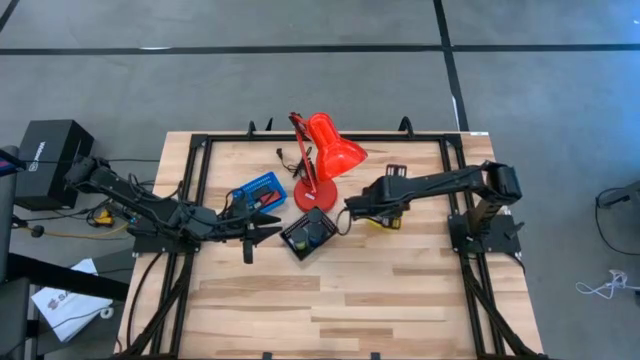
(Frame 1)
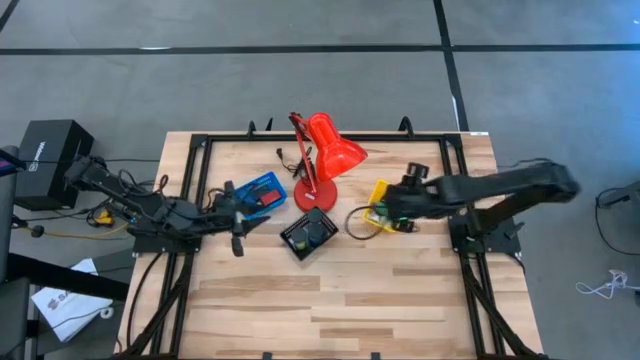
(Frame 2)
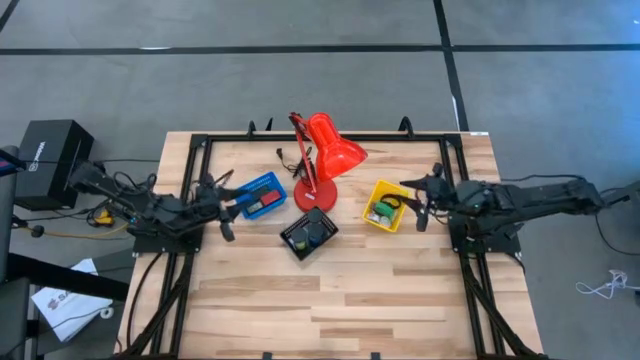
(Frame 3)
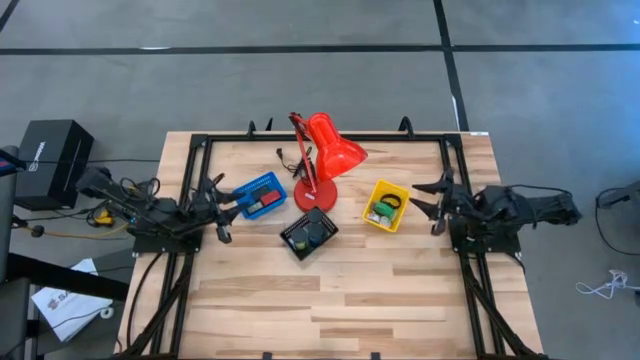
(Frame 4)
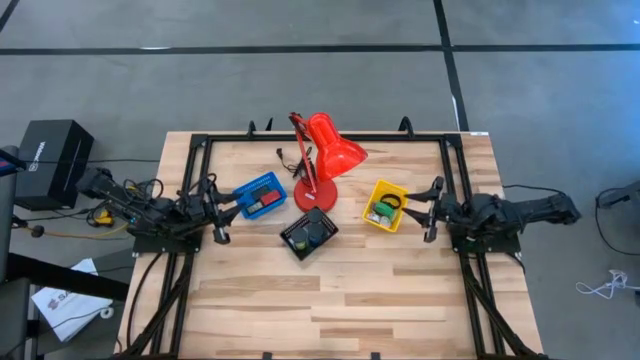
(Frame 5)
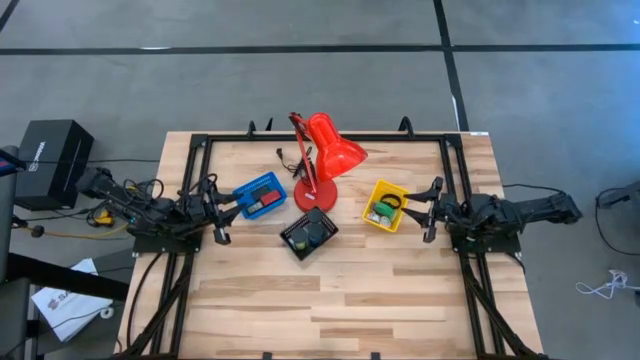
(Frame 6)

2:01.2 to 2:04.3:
Task: Pick & Place Office items
Return to home position

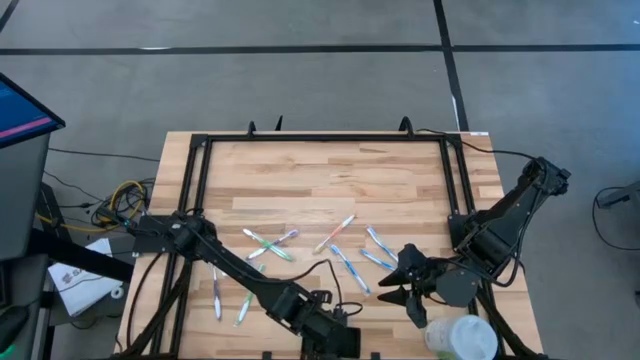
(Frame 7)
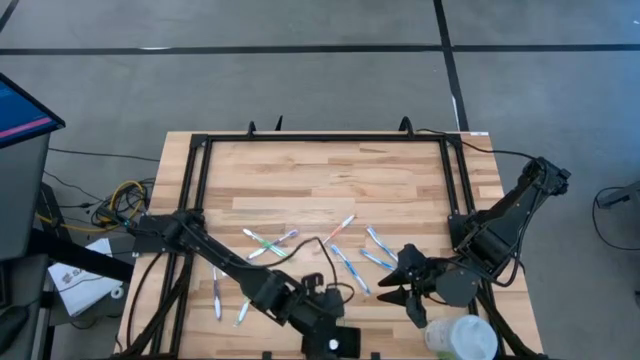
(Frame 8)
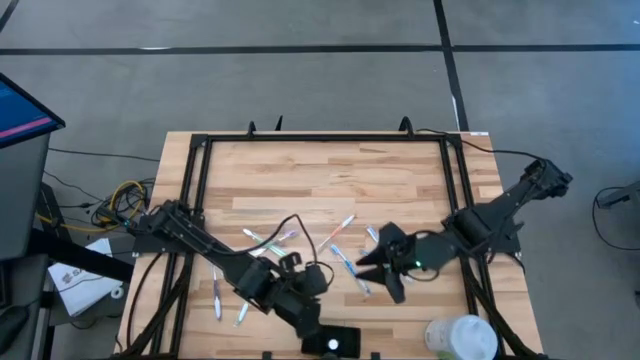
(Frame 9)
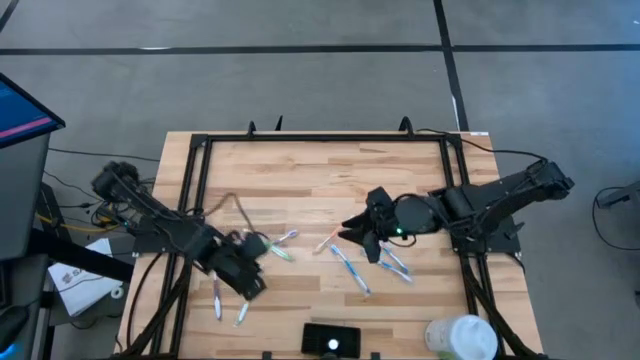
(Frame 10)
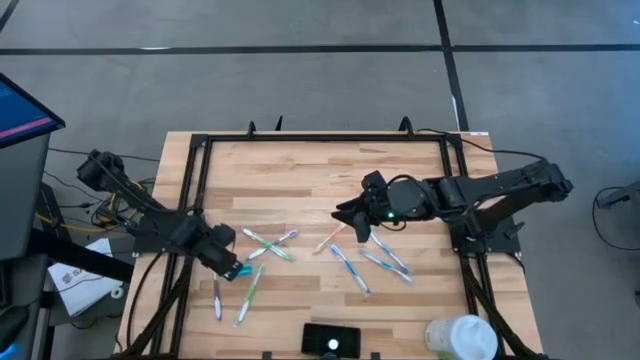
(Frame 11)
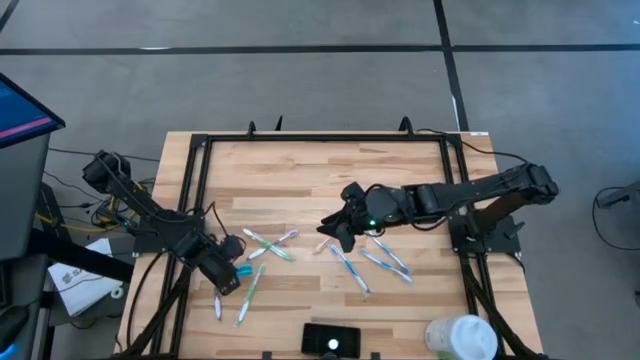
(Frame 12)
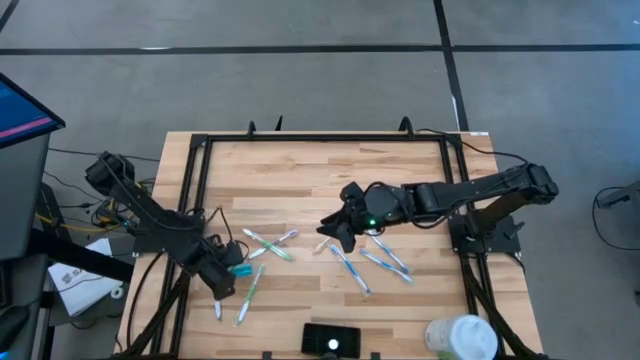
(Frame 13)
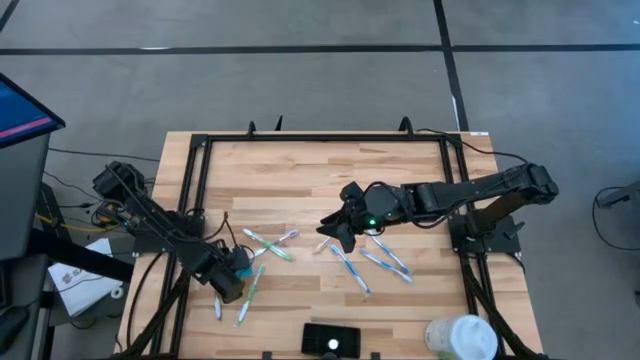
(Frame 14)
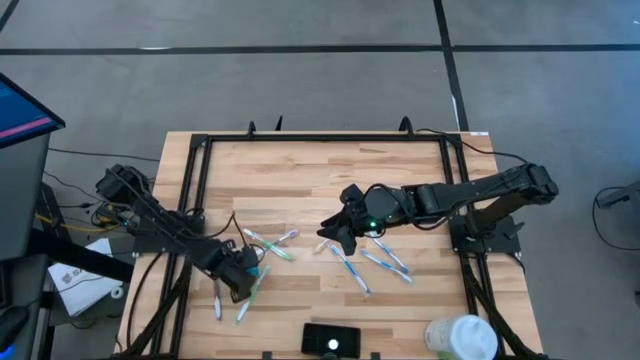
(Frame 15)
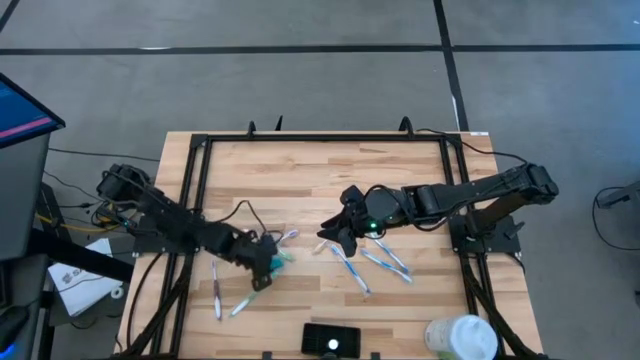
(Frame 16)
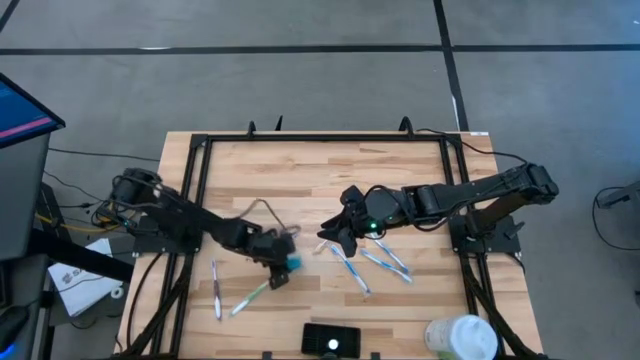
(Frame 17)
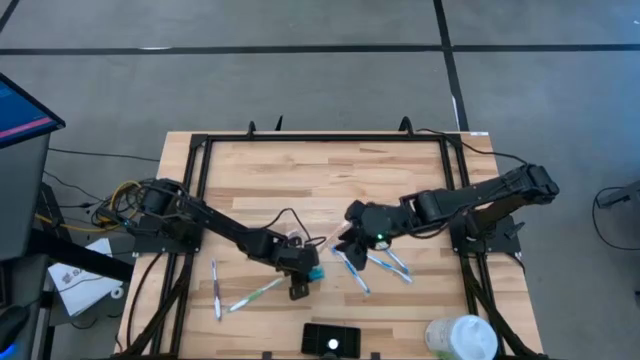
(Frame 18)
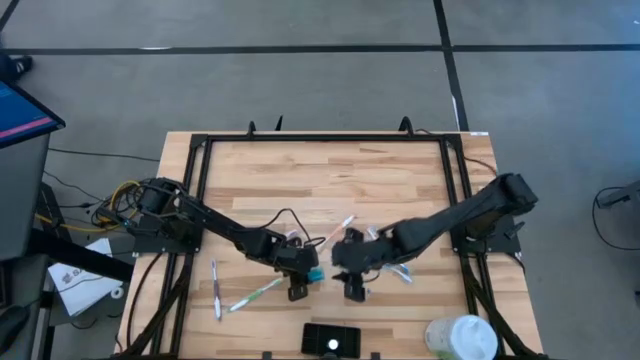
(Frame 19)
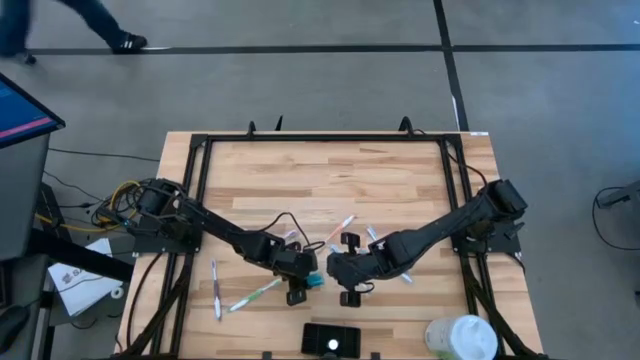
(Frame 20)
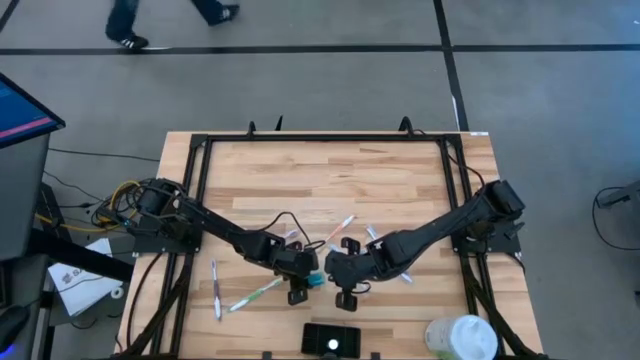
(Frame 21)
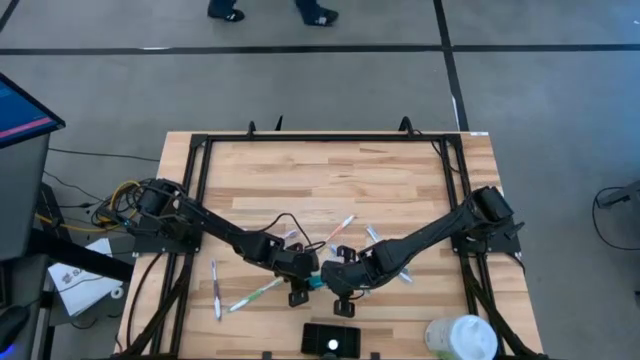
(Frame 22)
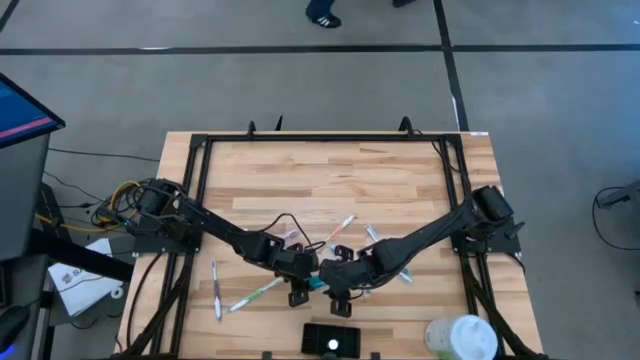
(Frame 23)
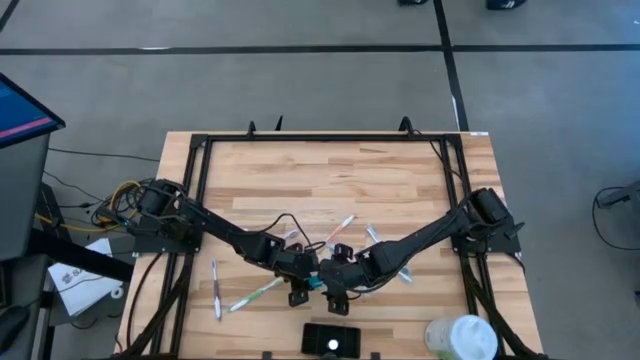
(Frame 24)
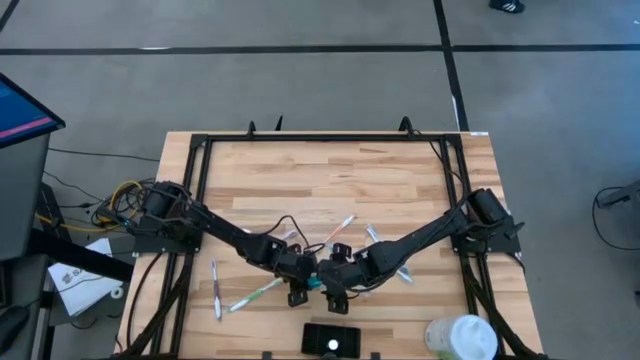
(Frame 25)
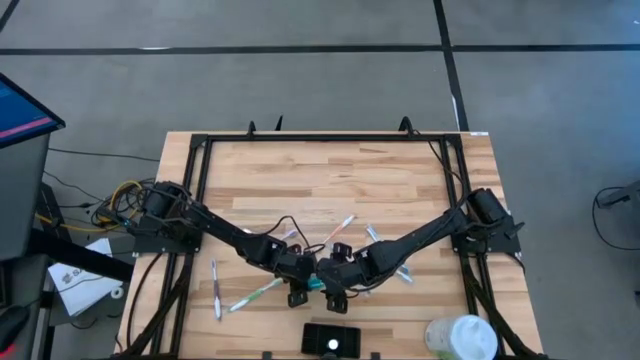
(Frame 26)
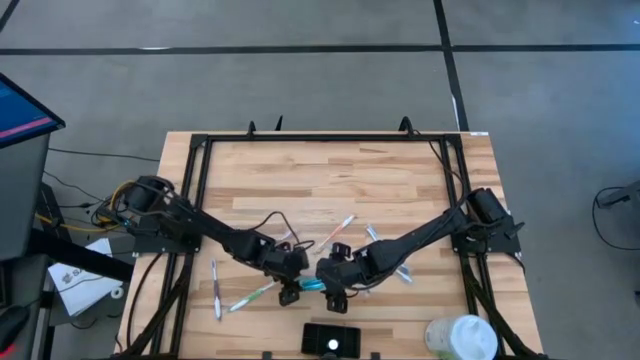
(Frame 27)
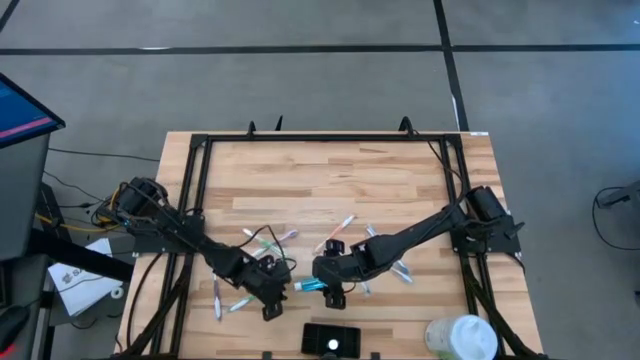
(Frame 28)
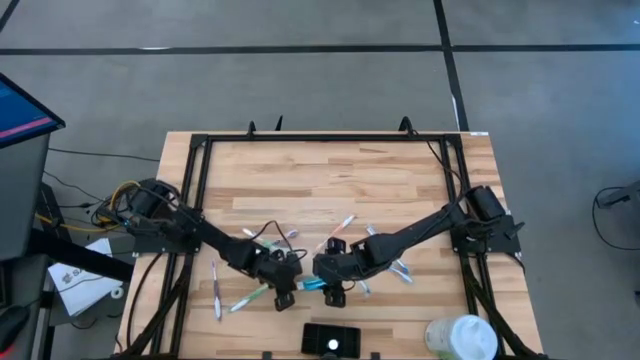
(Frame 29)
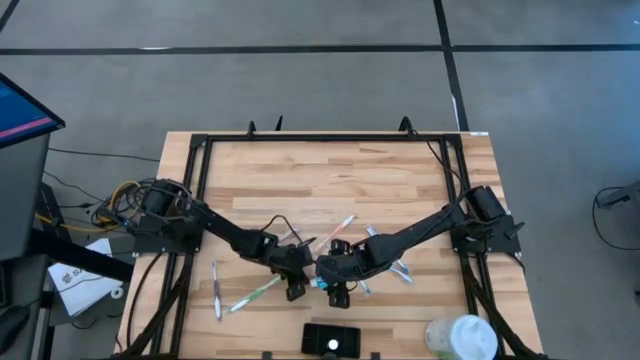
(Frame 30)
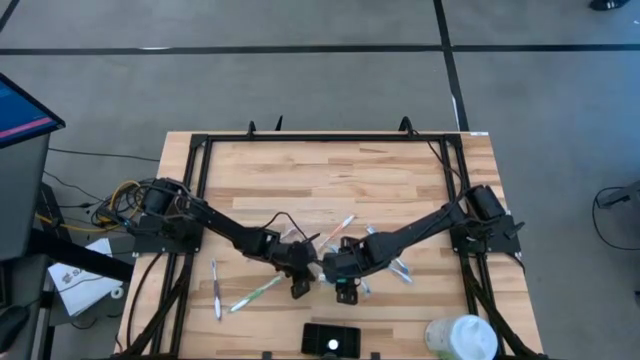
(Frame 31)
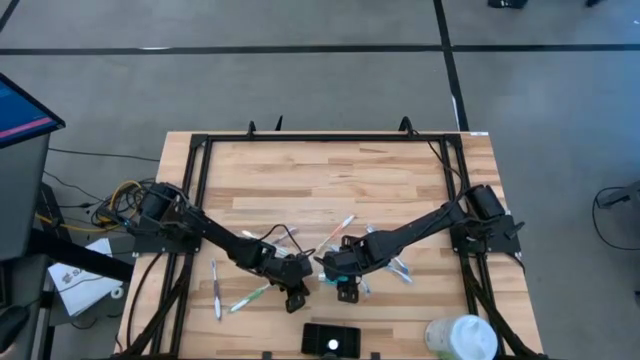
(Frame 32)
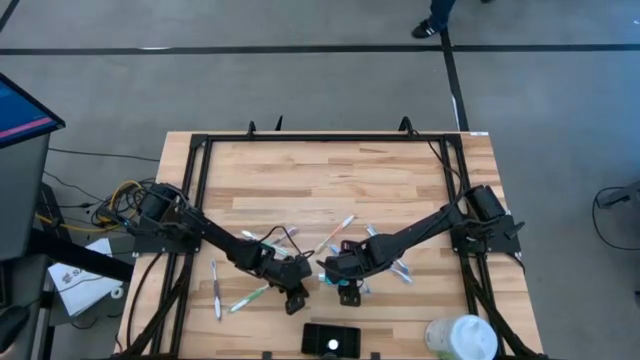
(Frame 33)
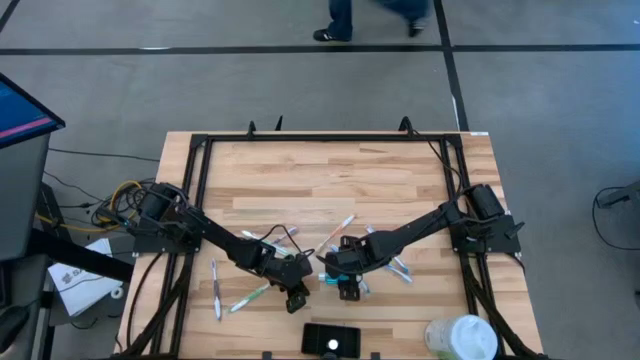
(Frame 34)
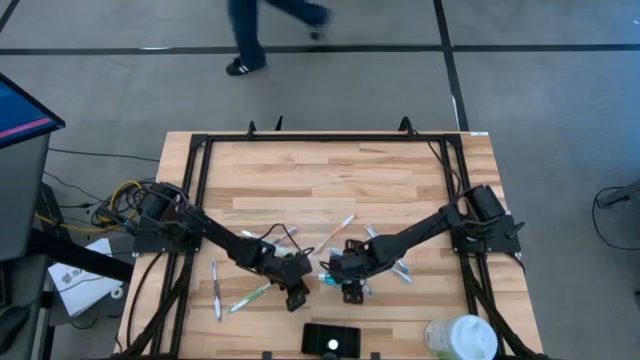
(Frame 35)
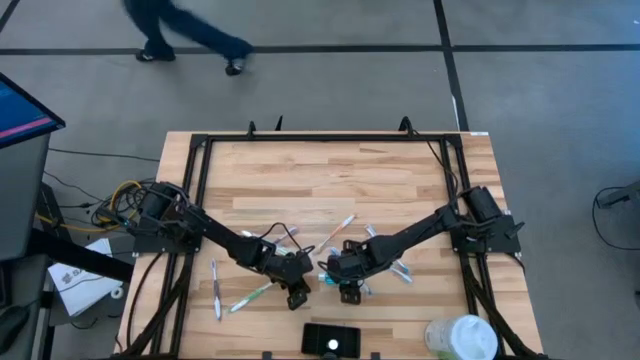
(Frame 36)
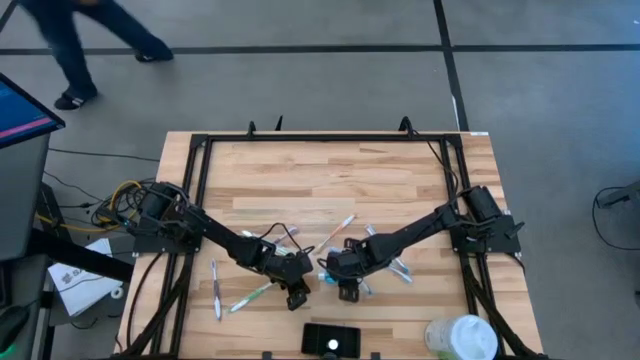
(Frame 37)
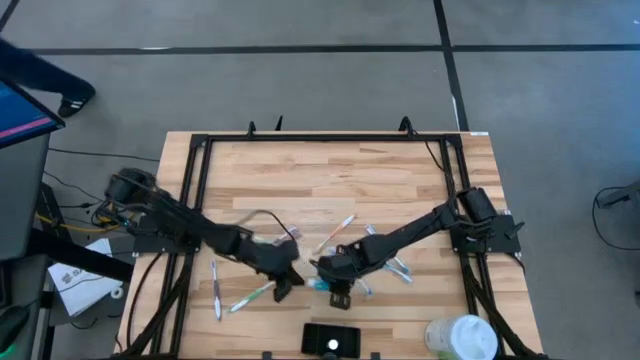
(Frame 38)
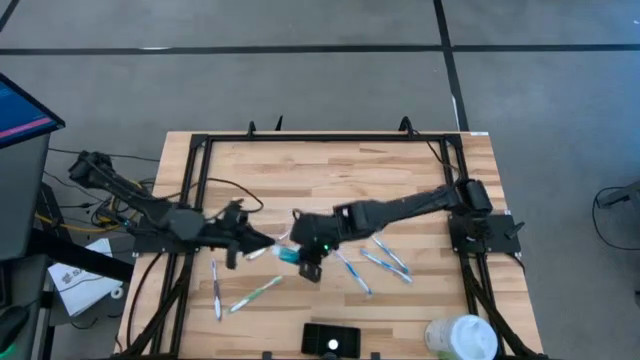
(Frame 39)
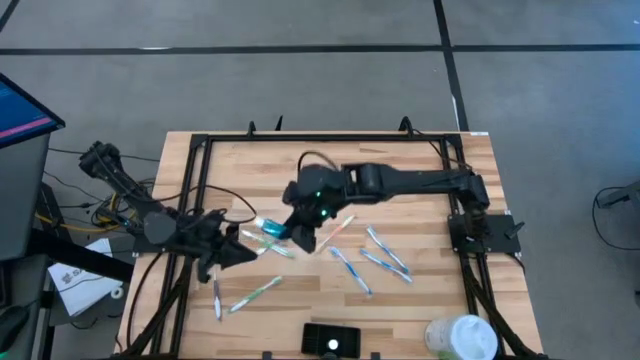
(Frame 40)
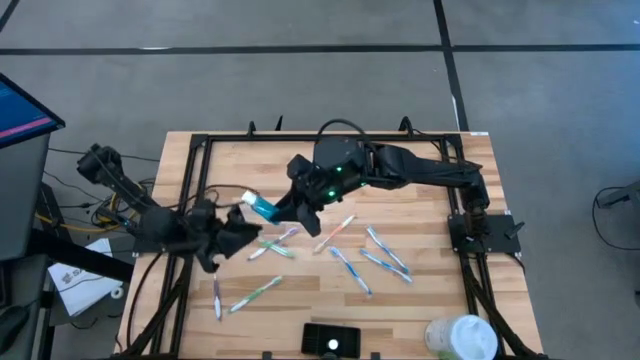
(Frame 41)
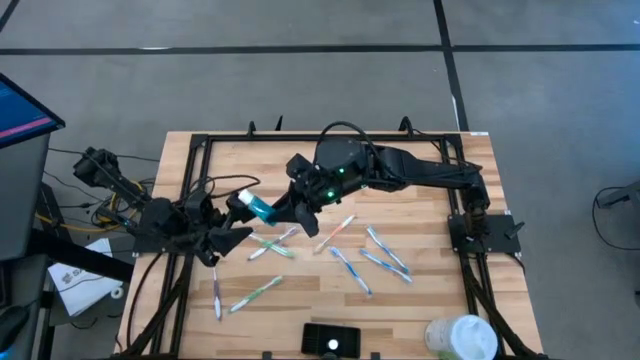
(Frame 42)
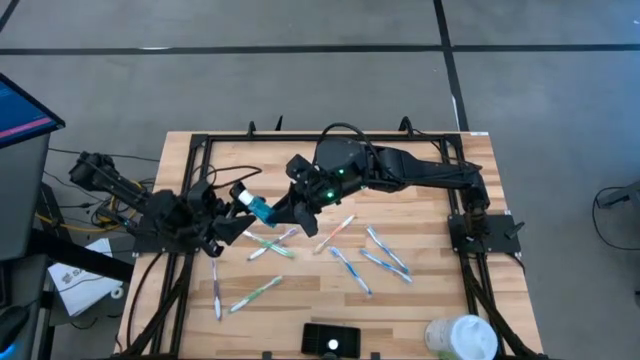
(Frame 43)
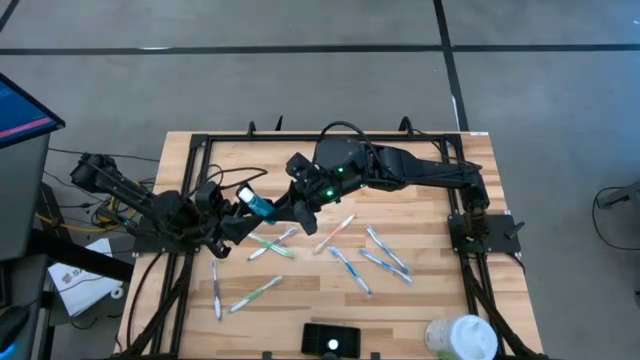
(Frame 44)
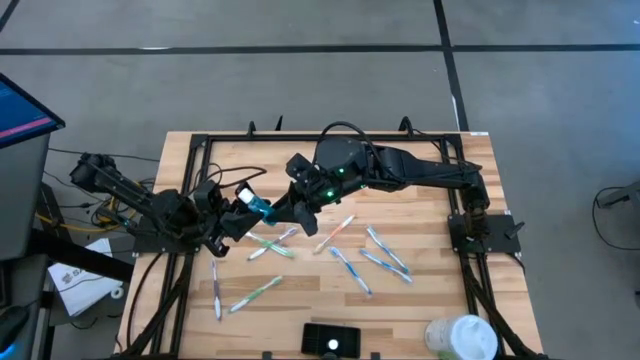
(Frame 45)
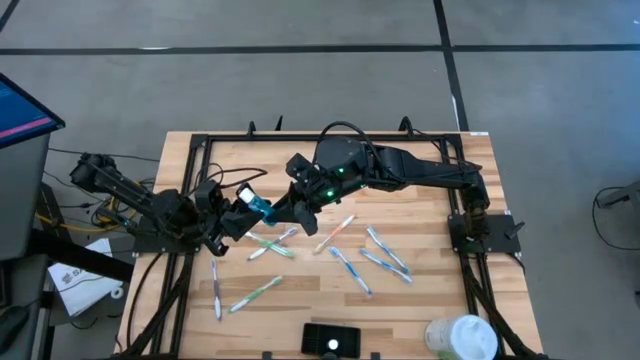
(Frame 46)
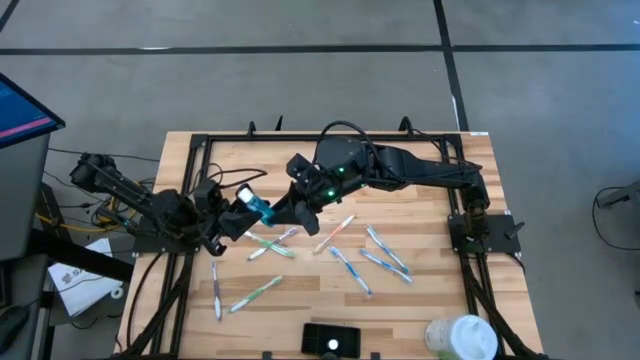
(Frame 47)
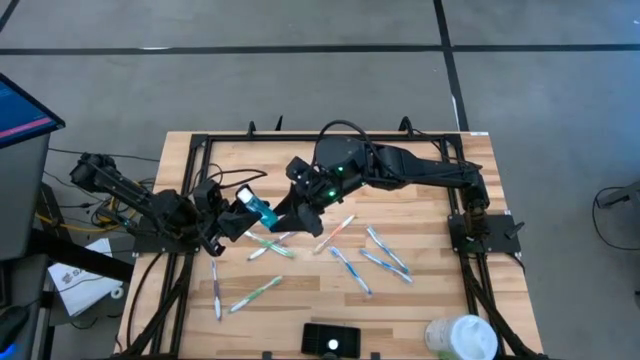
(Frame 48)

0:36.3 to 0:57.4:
Task: Pick & Place toothbrushing station
Put the blue mouthwash into the black mesh organizer
